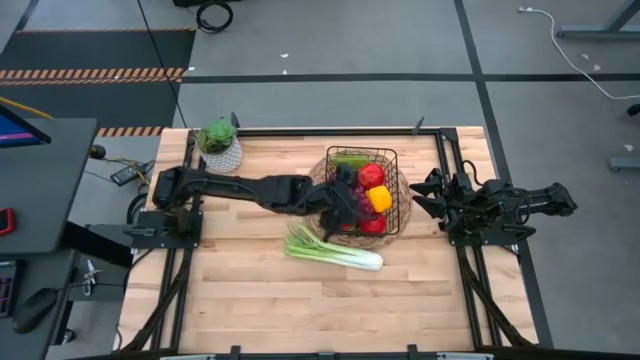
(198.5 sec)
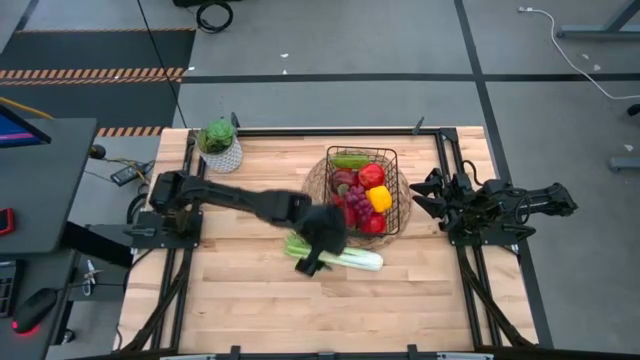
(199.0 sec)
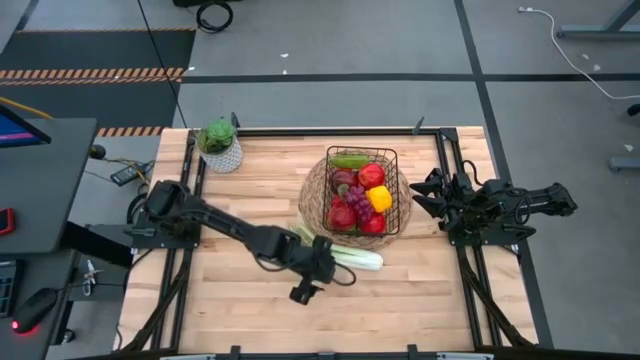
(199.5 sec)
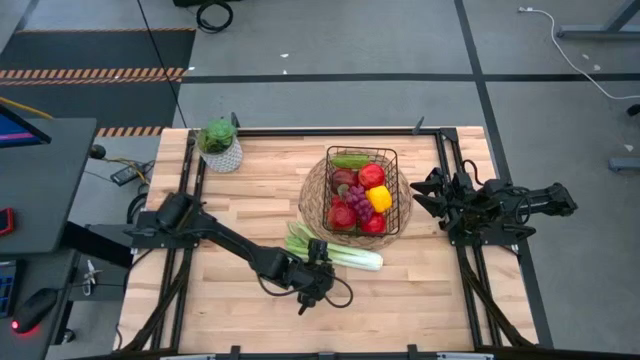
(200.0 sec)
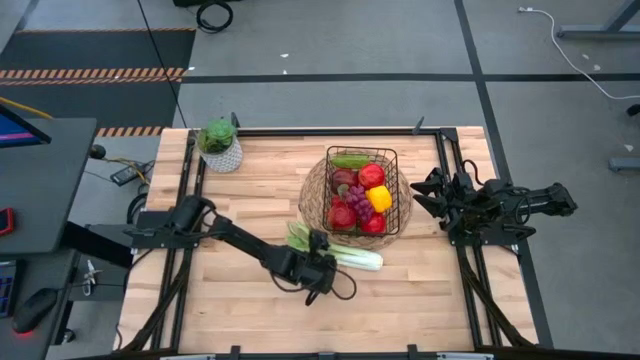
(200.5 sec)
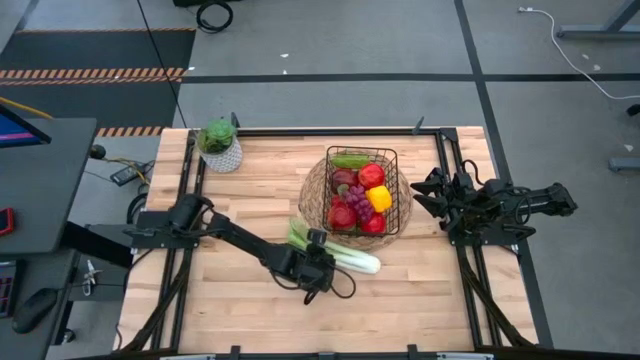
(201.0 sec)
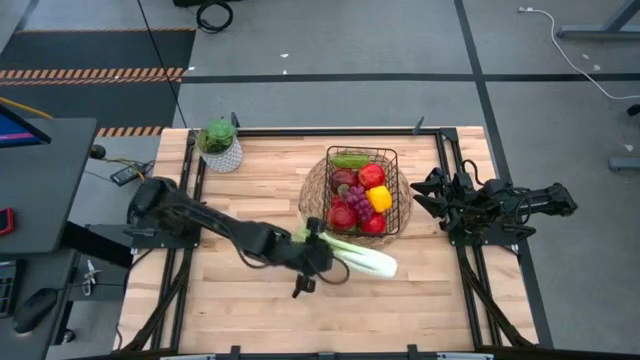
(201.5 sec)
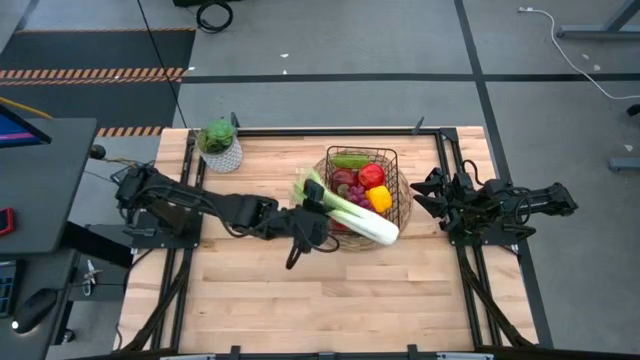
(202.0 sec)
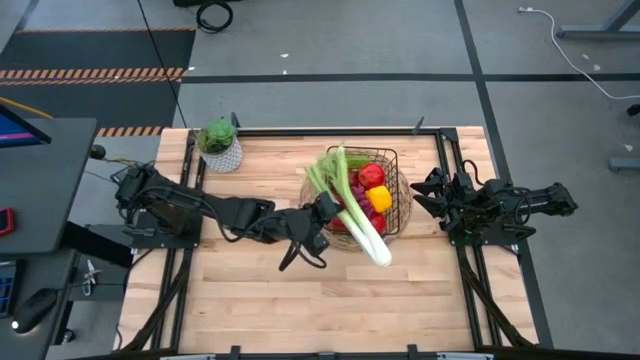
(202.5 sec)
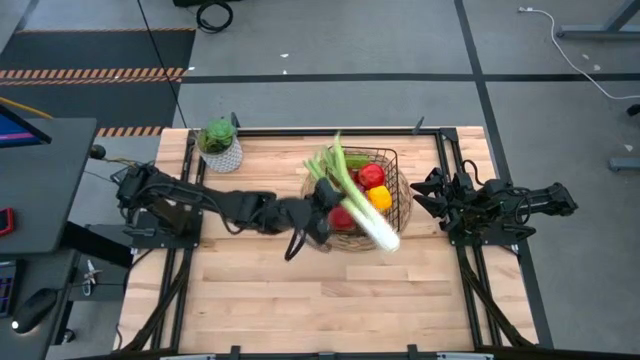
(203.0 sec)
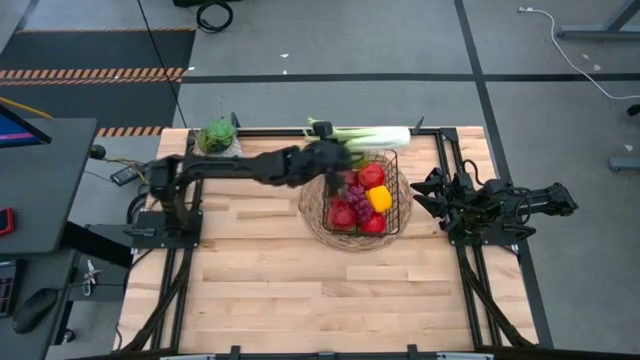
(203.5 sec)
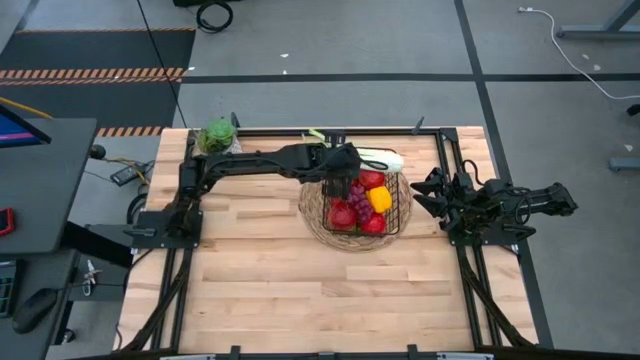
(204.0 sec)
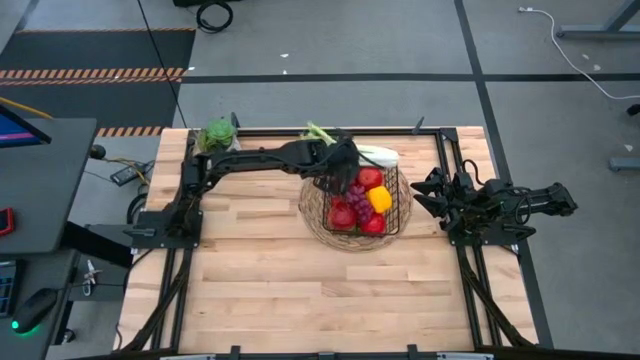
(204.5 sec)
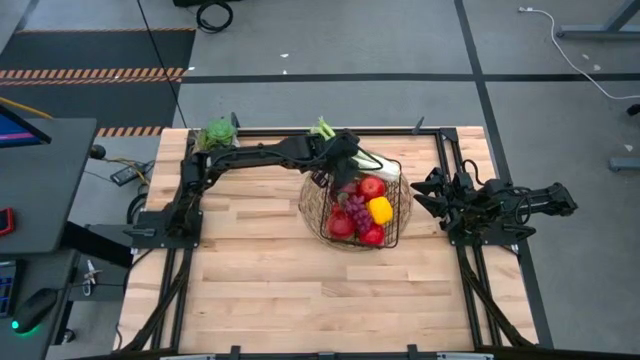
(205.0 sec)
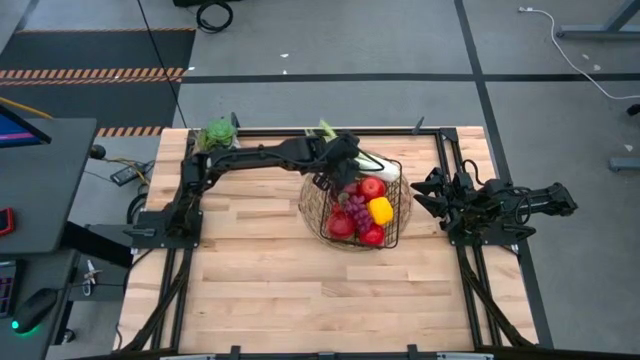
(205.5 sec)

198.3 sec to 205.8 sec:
Task: Build produce basket
Put the celery into the wire basket

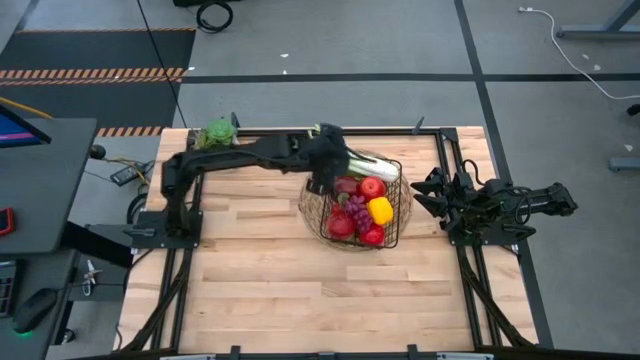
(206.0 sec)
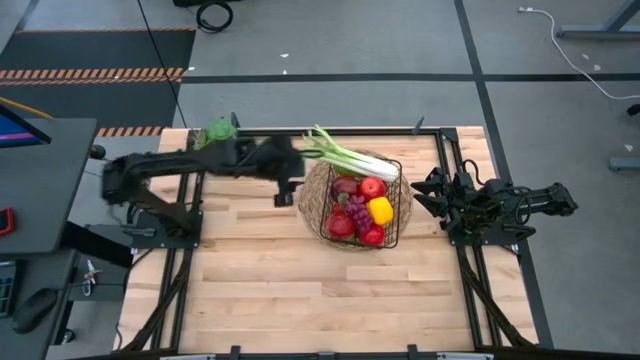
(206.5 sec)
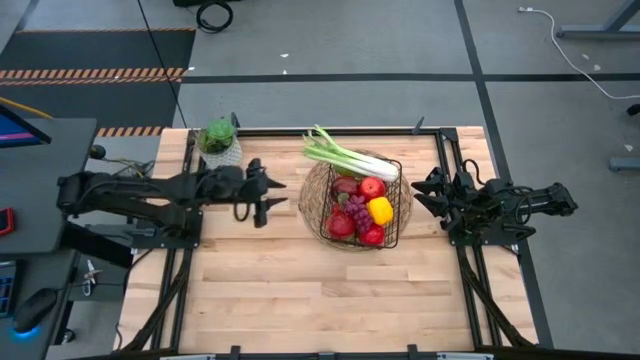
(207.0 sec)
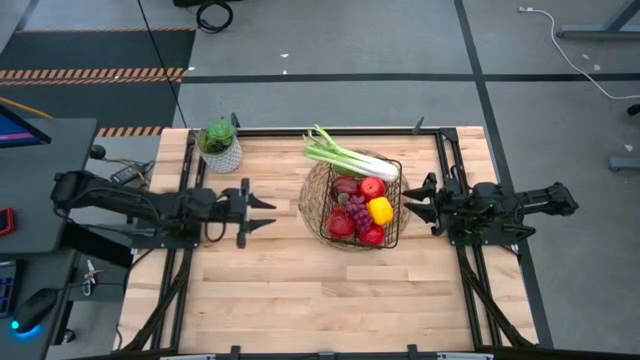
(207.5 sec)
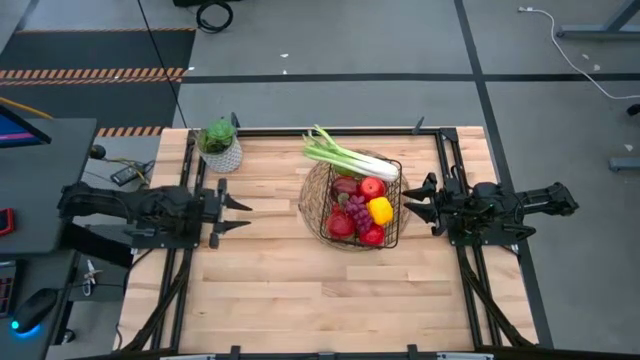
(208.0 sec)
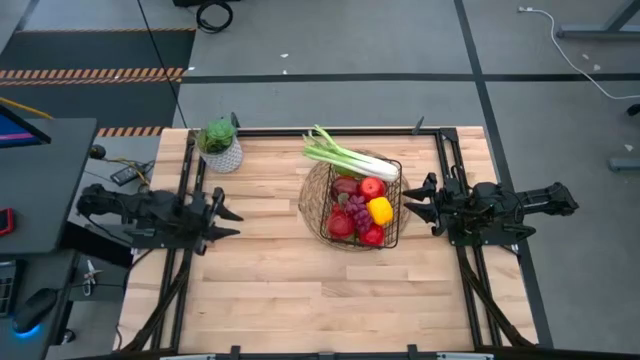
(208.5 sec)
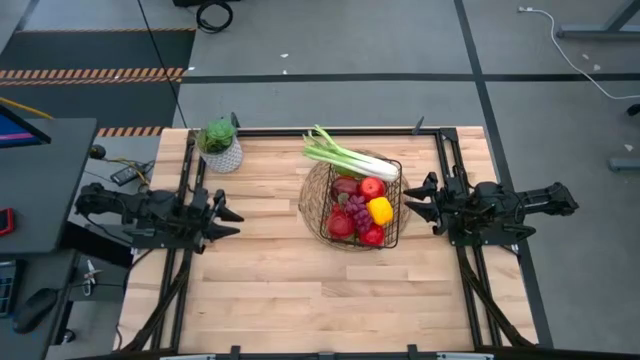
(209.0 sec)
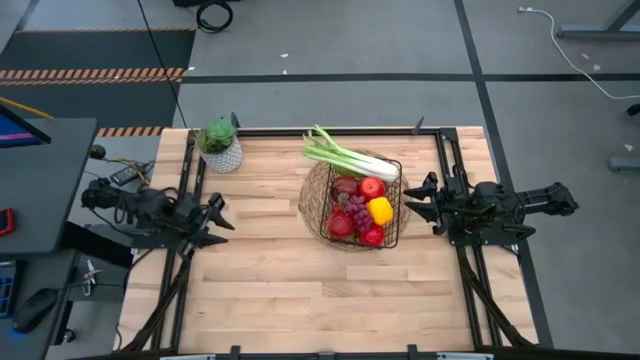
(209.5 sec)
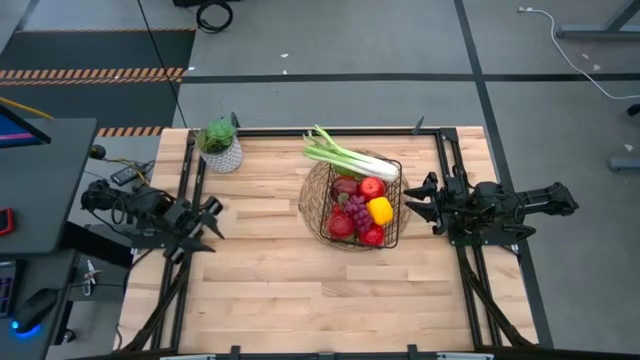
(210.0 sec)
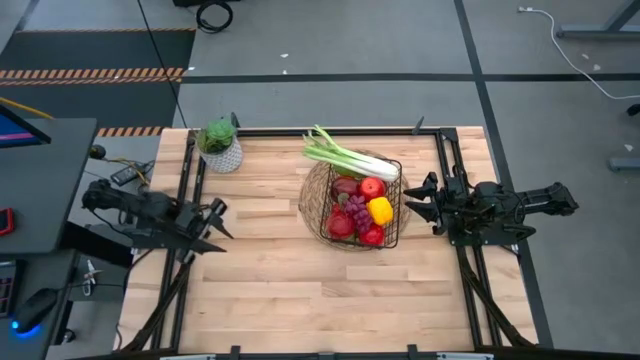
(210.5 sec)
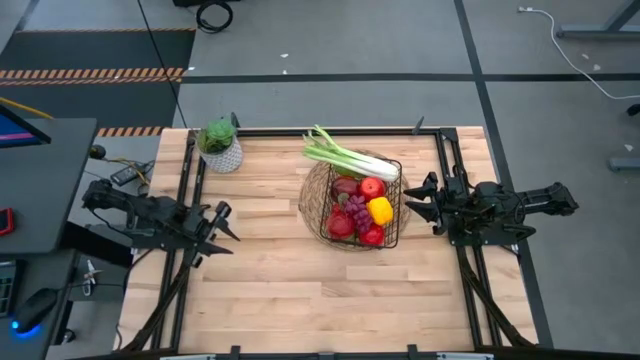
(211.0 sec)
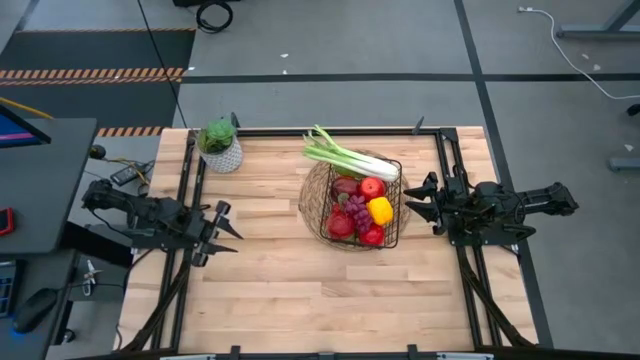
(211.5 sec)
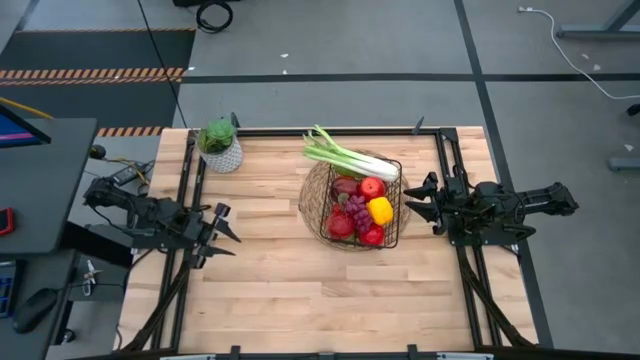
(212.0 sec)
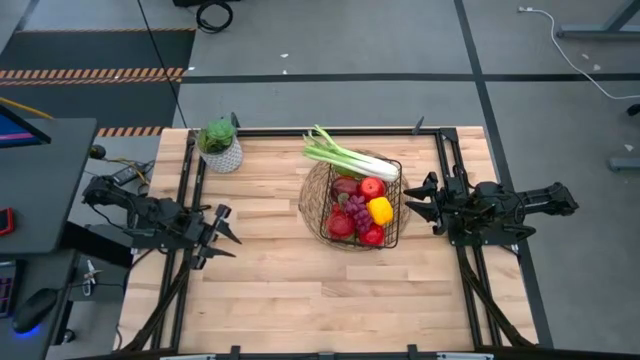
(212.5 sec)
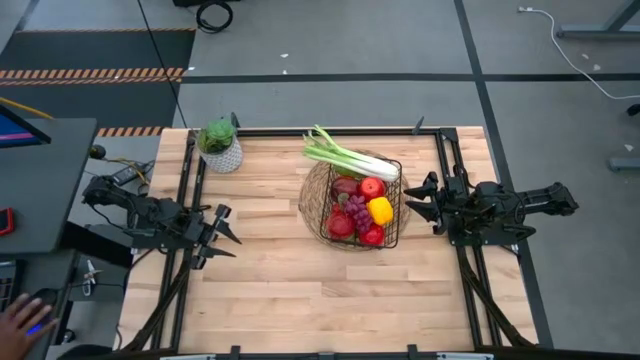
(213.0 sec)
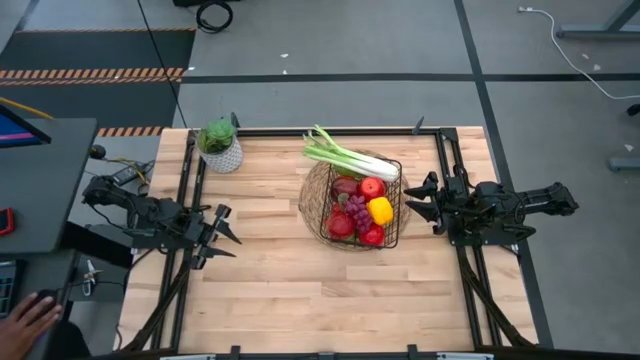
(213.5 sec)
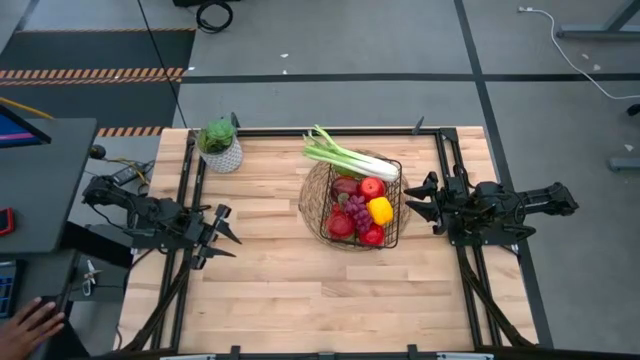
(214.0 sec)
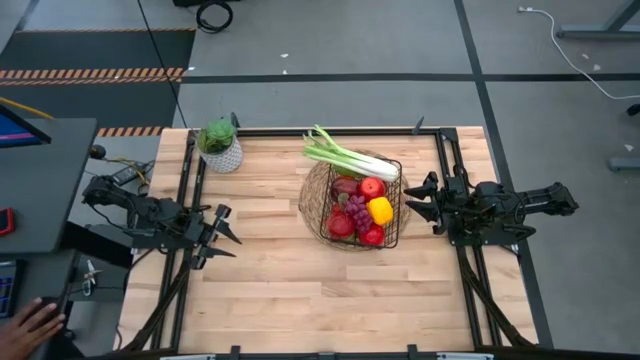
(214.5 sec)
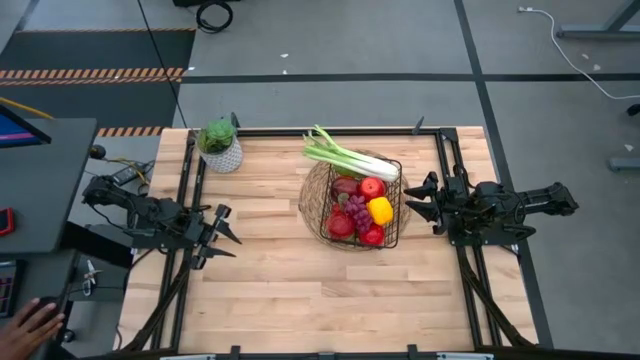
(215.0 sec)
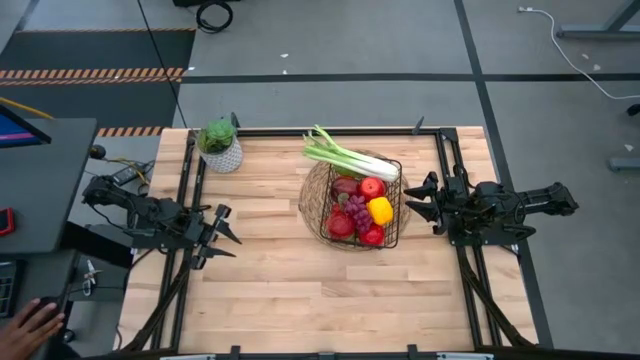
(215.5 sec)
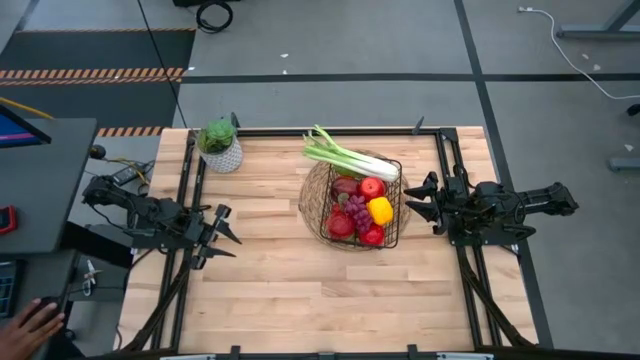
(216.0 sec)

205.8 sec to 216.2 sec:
Return to Home Position
